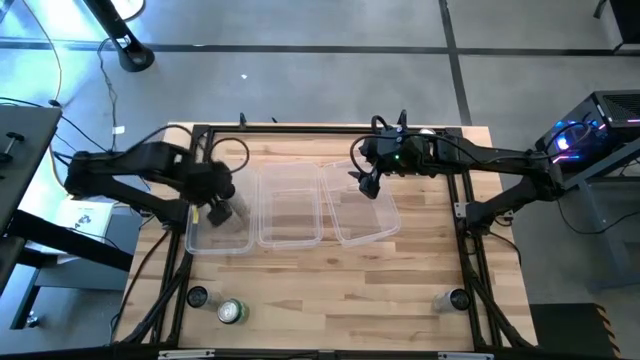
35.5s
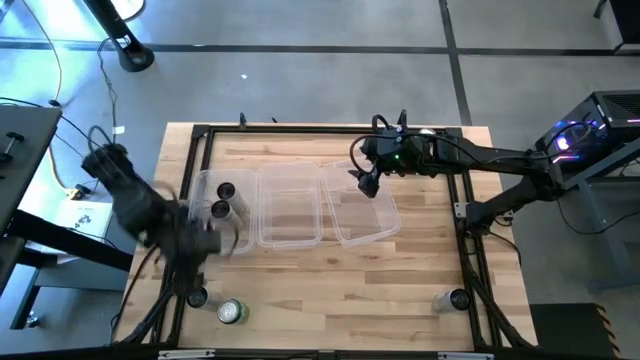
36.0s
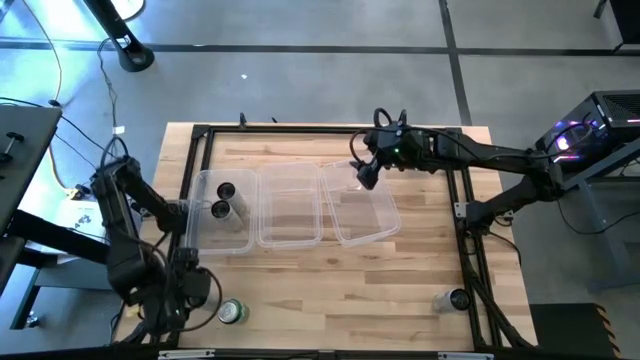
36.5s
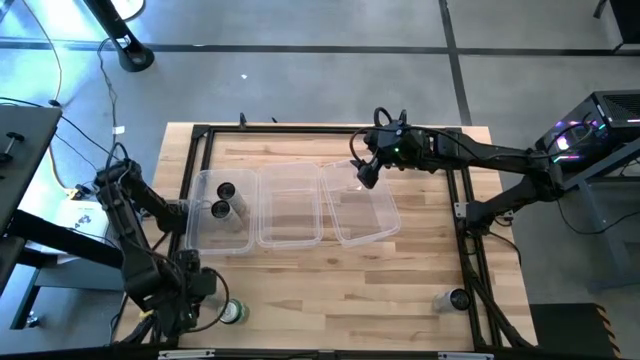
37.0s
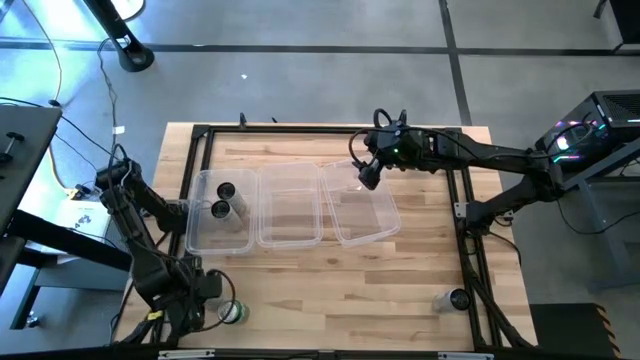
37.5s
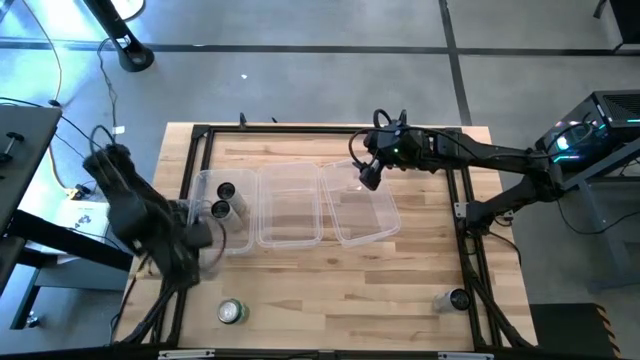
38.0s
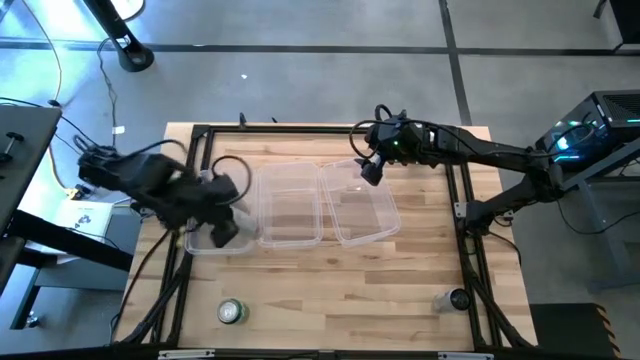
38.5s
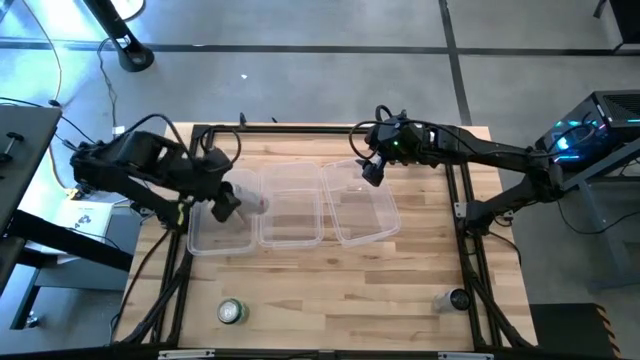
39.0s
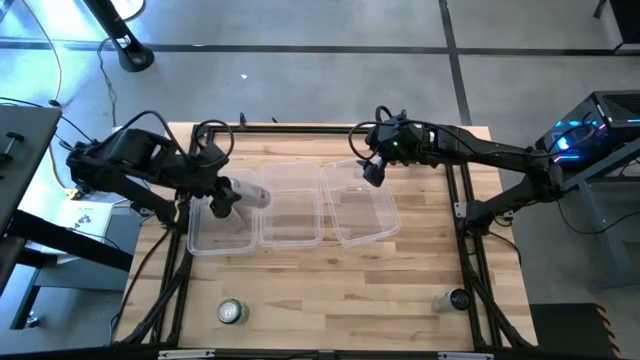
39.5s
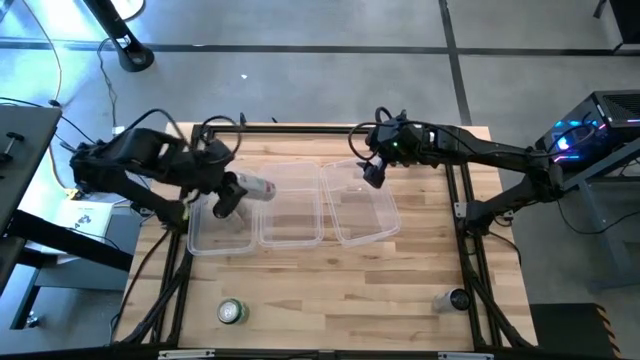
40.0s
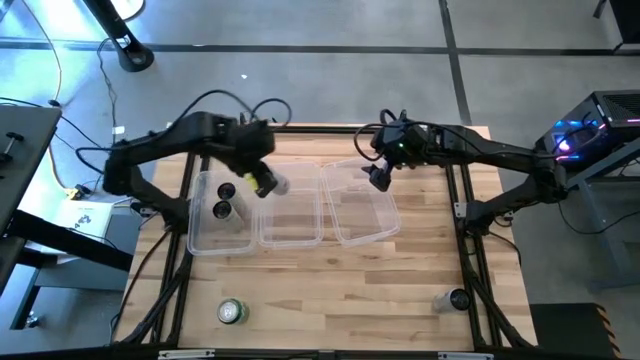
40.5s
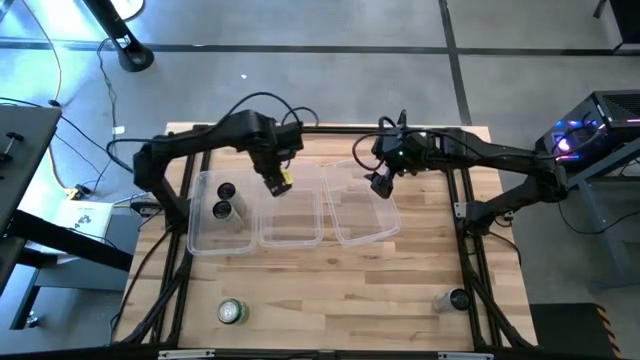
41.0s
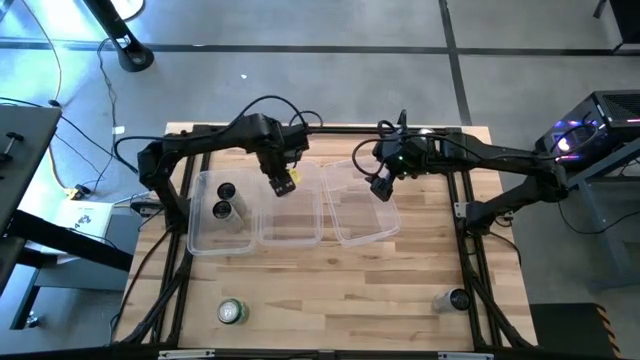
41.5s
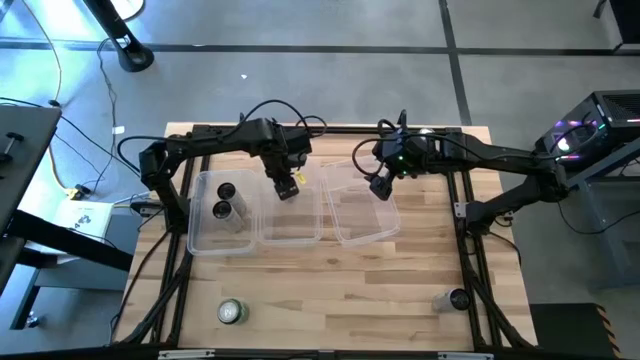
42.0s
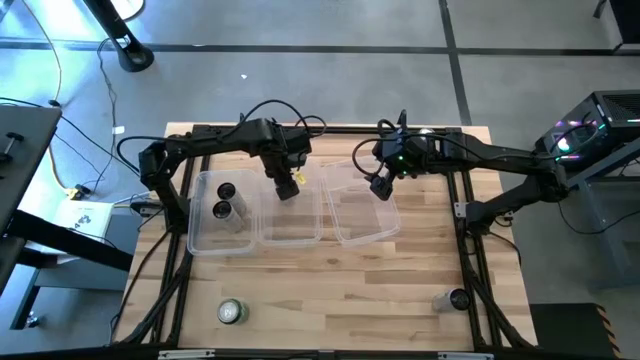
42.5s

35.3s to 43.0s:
Task: Sort soda cans
Put the white-pink soda can into the center transparent container

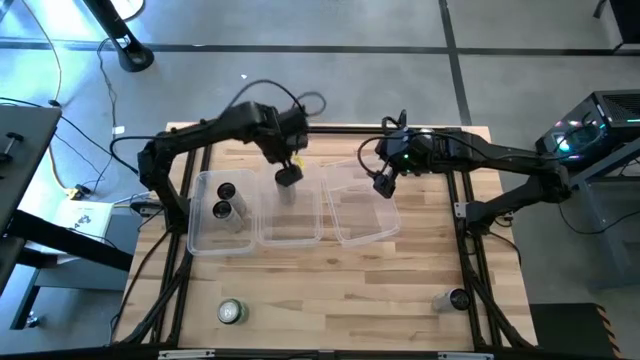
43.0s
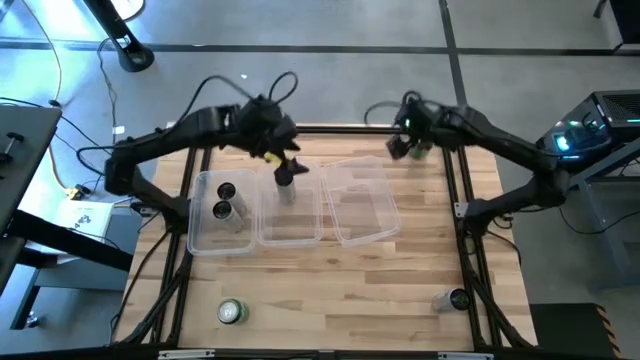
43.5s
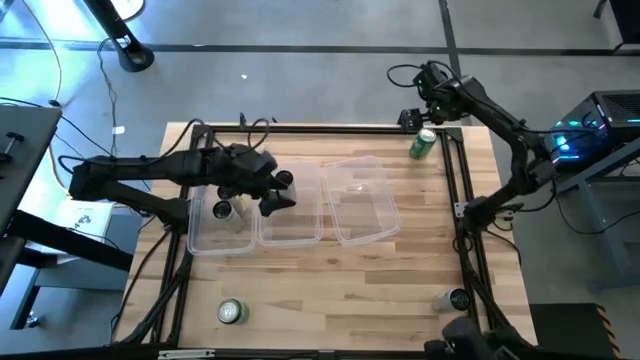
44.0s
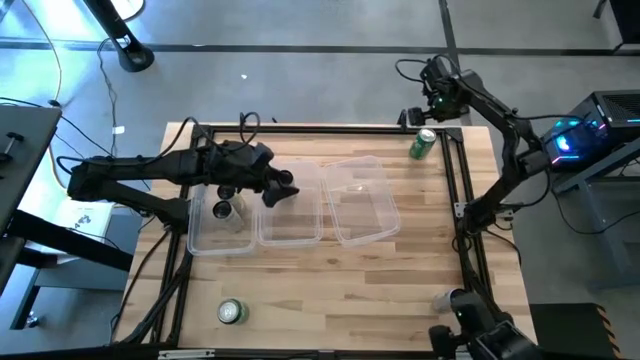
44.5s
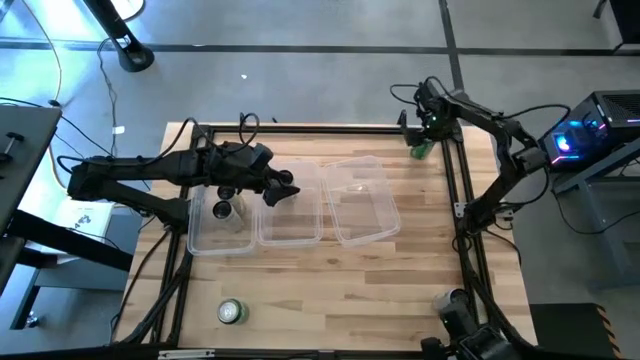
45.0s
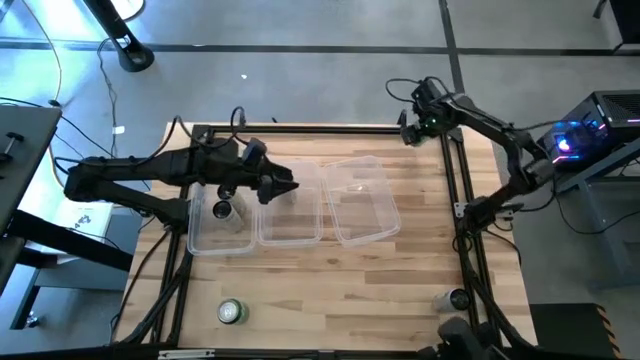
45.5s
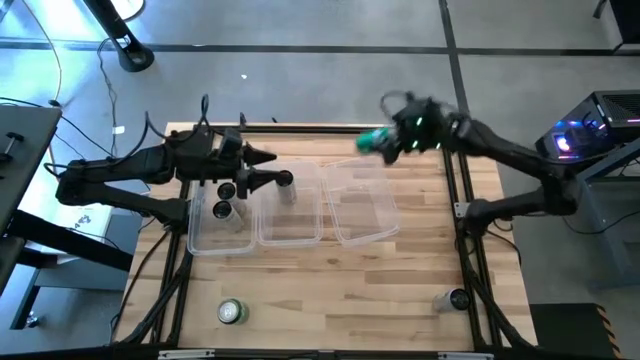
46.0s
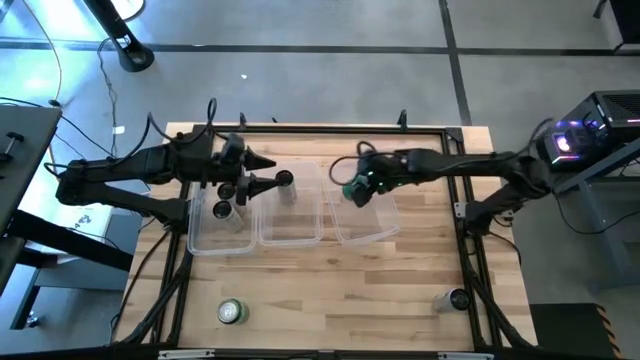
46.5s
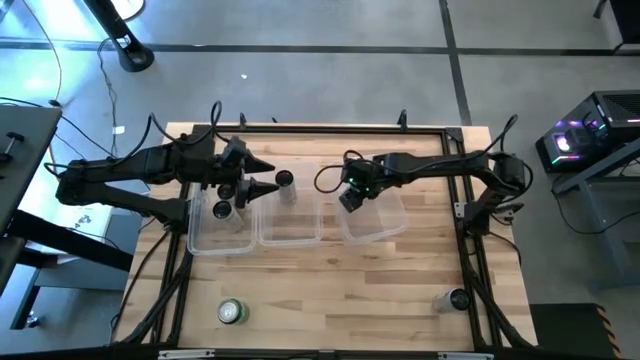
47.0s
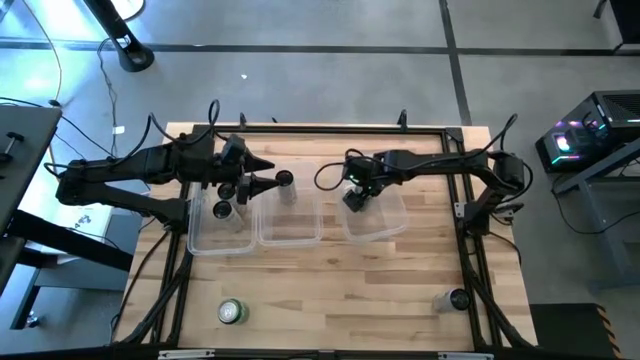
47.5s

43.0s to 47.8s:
Put the green soda can into the right transparent container

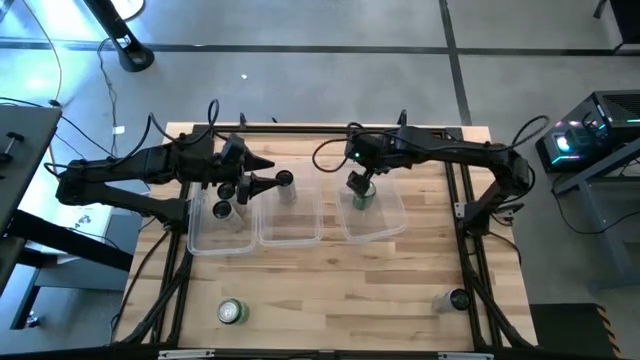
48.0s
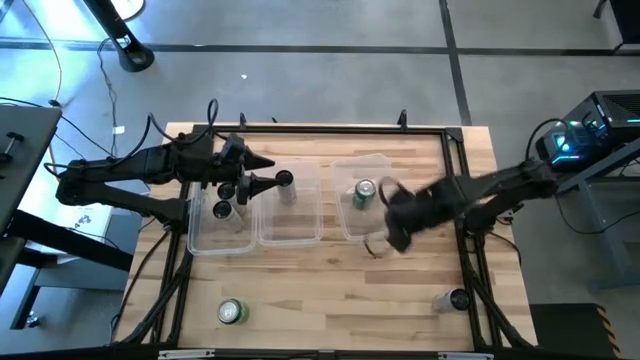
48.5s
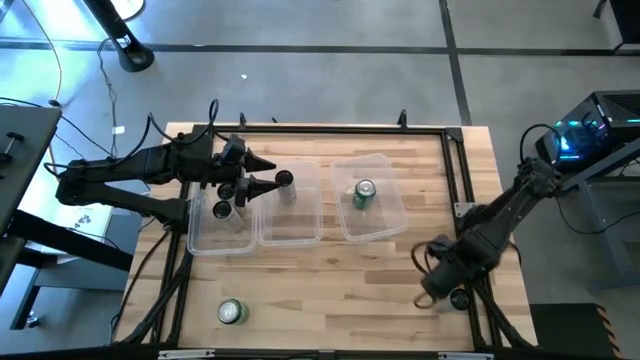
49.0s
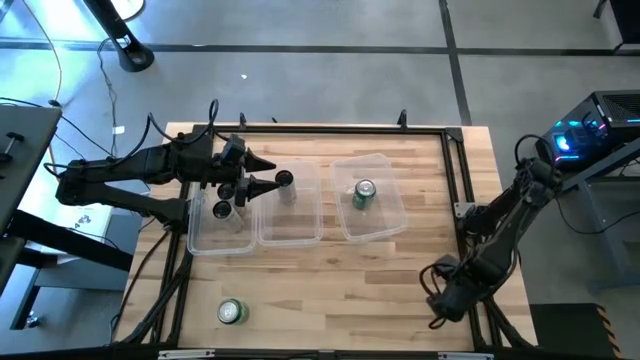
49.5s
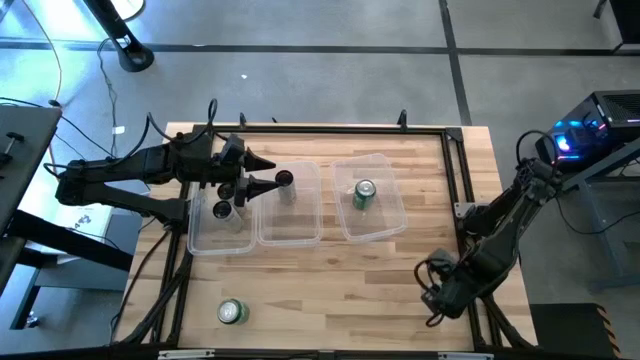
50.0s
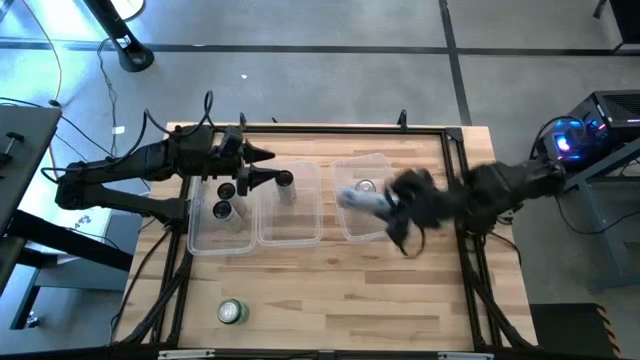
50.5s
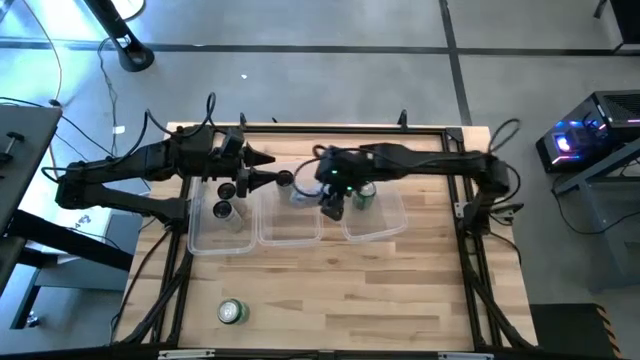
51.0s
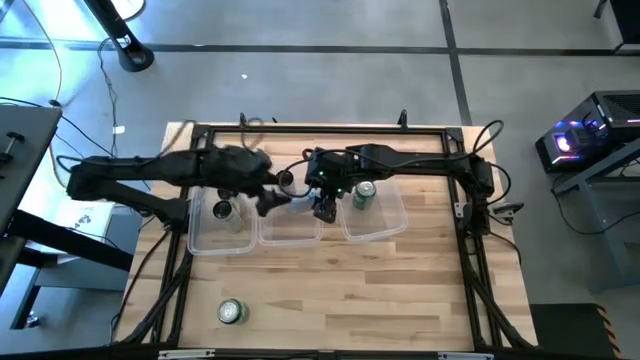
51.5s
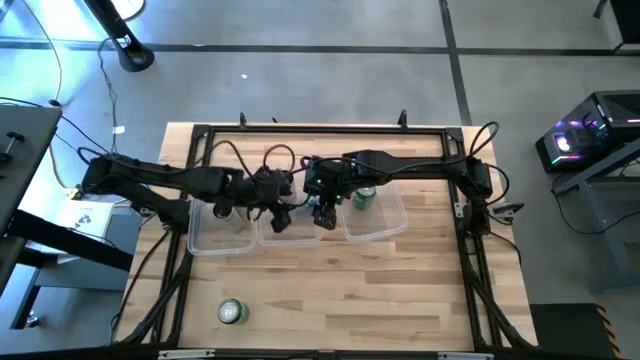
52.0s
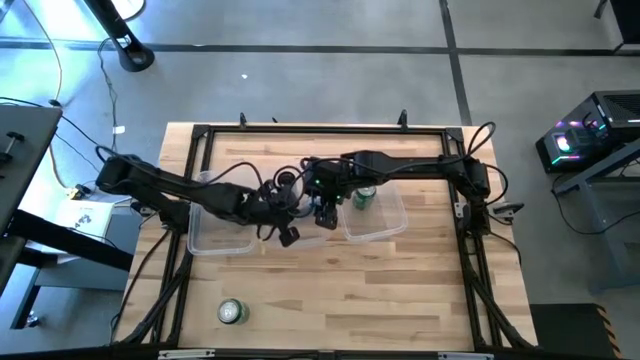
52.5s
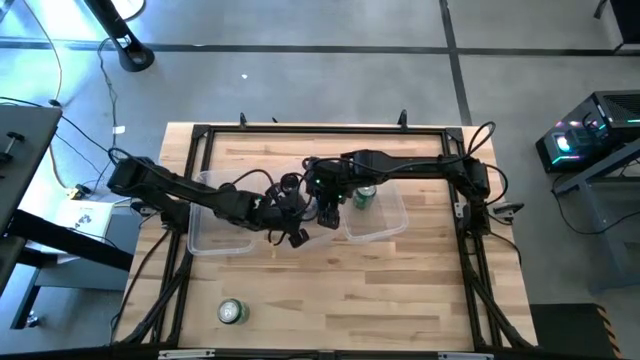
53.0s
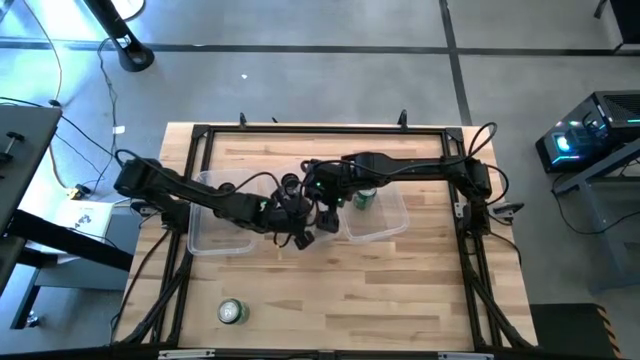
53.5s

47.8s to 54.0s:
Put the white-pink soda can into the center transparent container

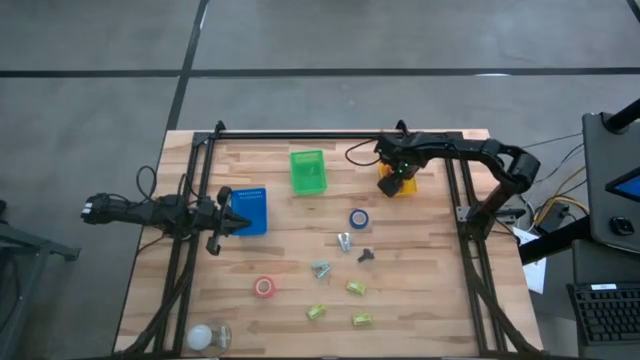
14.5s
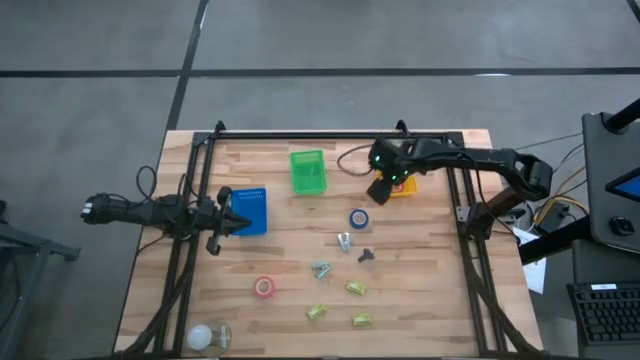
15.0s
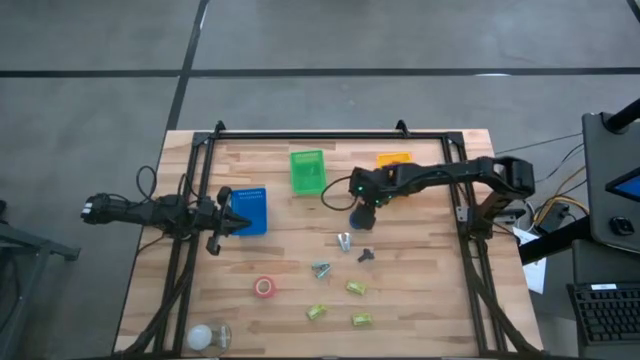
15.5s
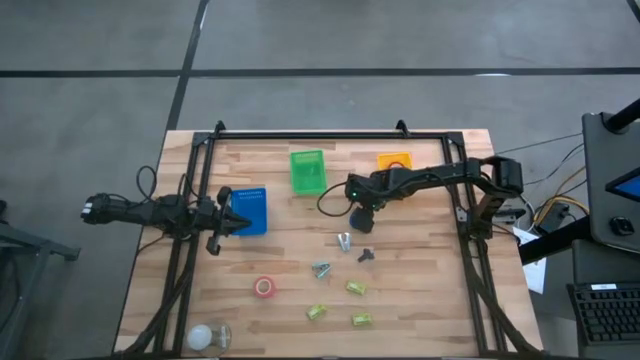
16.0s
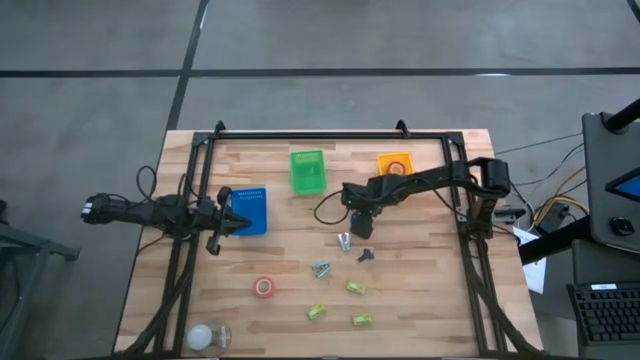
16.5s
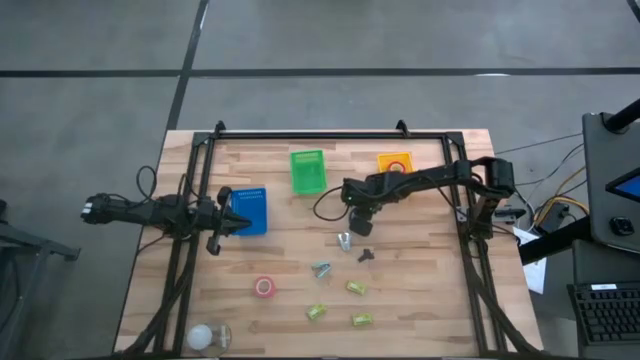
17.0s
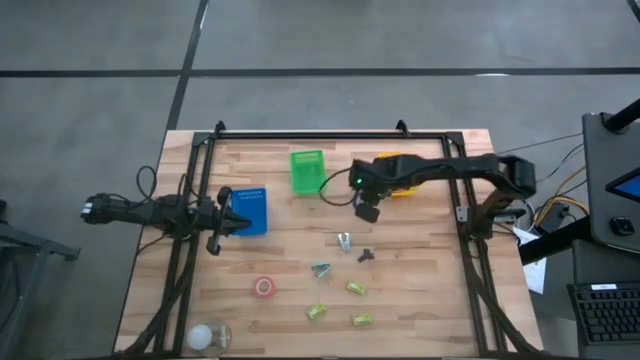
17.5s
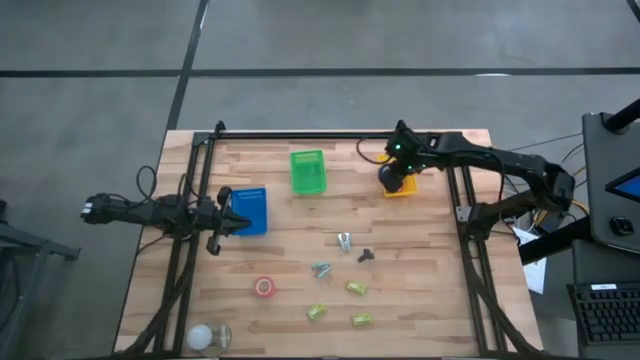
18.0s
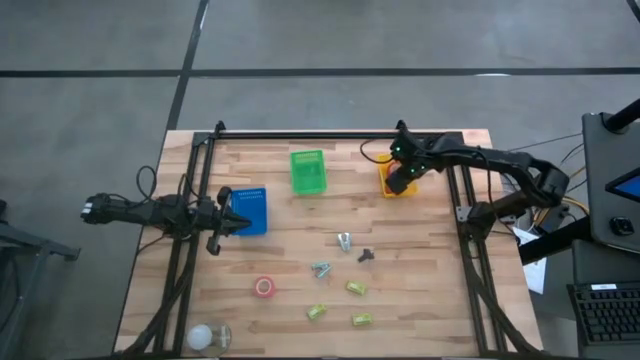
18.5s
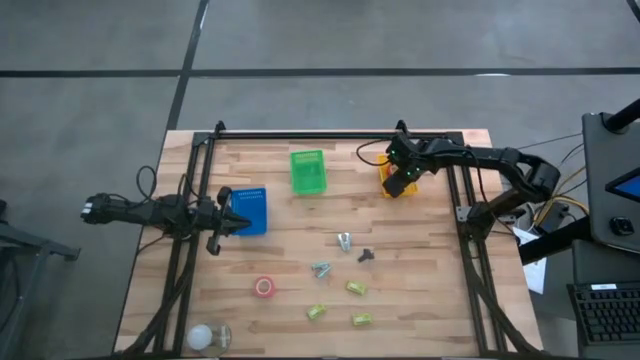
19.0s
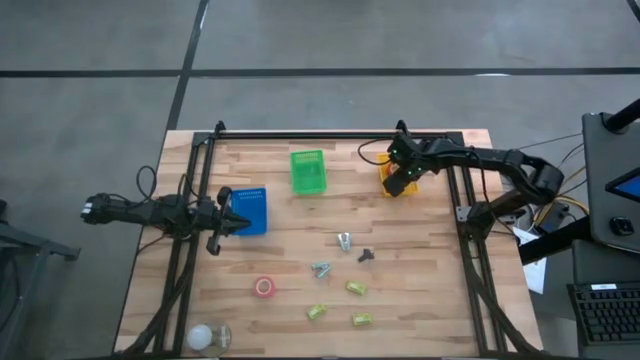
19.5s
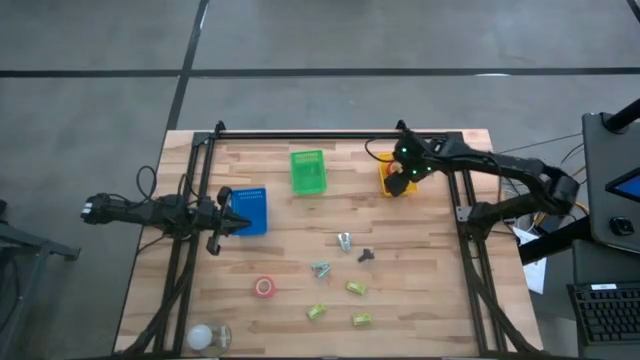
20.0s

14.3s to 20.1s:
Task: Pick and place Stapler, Stapler remover, tape
Put the blue tape into the yellow bin
